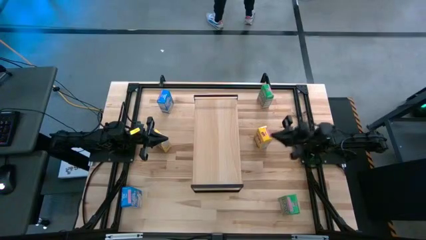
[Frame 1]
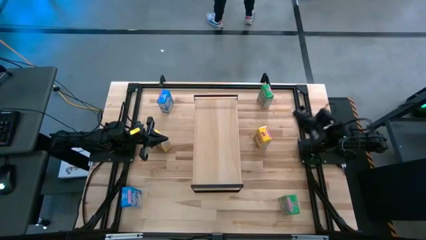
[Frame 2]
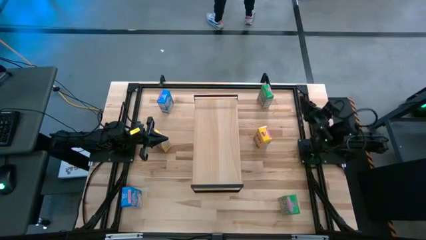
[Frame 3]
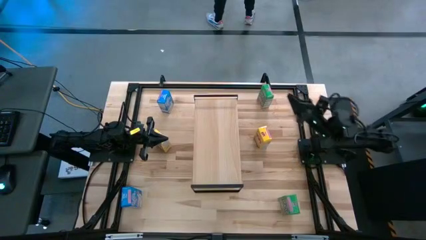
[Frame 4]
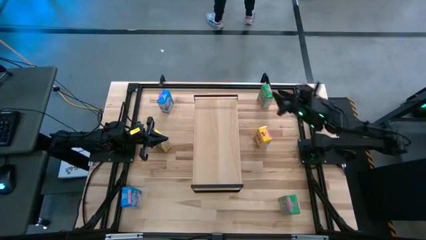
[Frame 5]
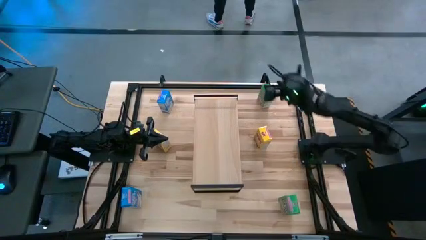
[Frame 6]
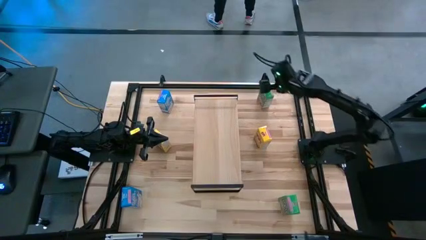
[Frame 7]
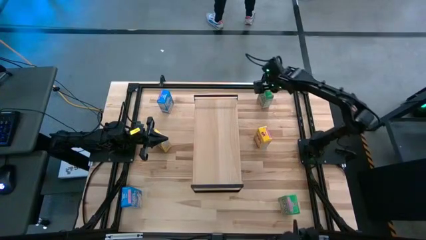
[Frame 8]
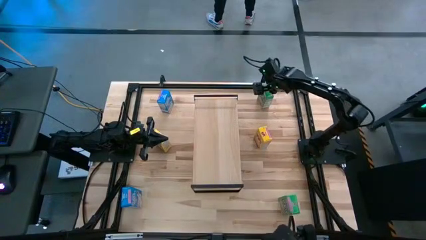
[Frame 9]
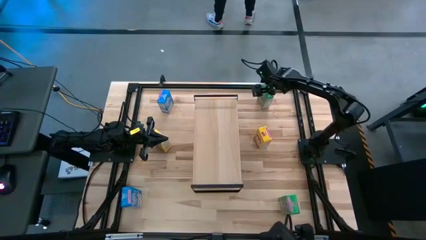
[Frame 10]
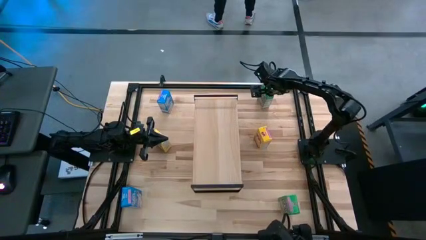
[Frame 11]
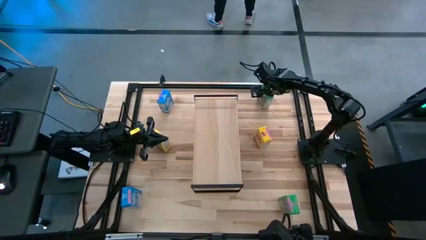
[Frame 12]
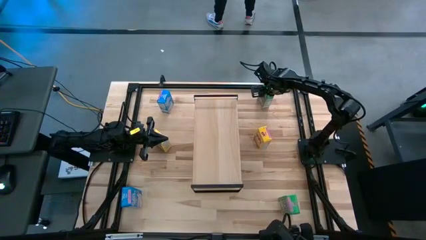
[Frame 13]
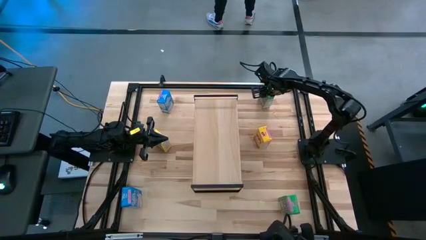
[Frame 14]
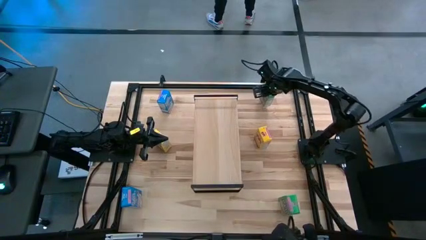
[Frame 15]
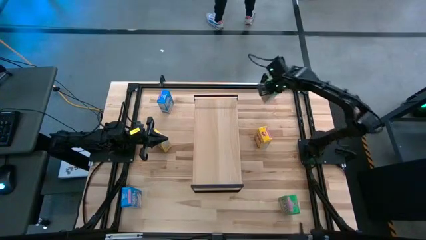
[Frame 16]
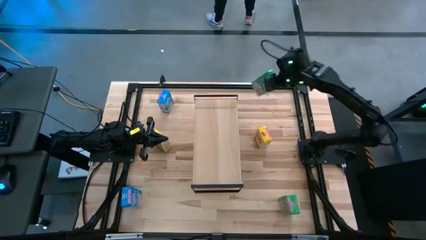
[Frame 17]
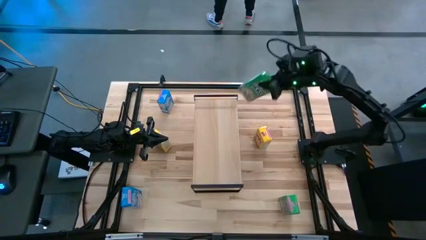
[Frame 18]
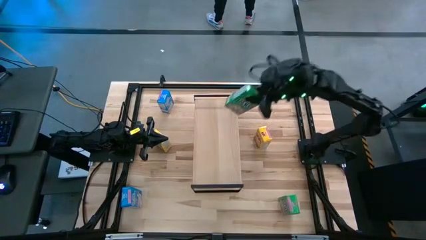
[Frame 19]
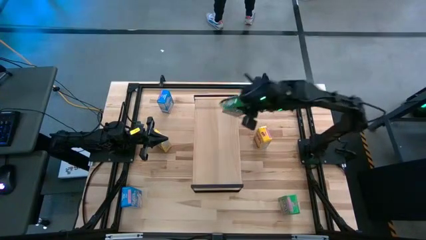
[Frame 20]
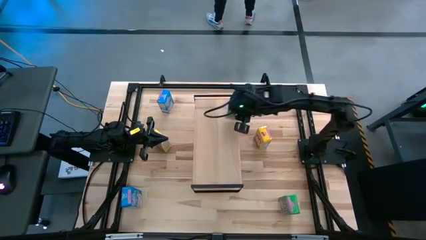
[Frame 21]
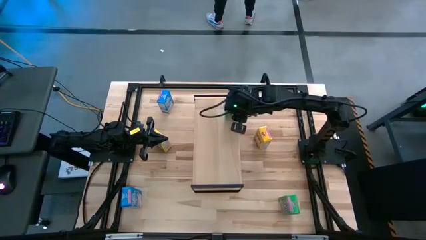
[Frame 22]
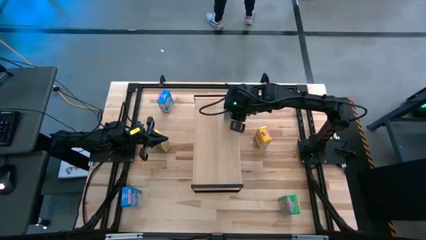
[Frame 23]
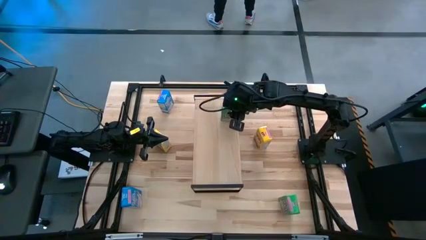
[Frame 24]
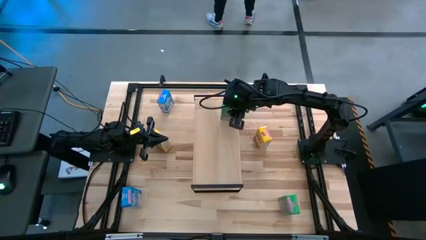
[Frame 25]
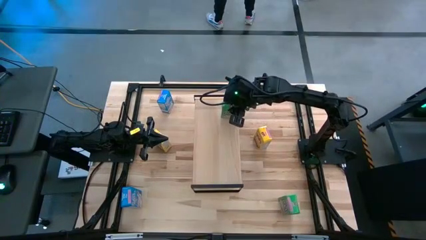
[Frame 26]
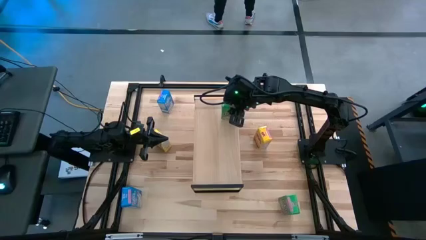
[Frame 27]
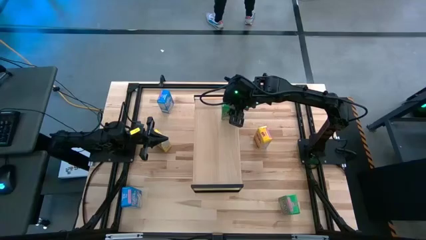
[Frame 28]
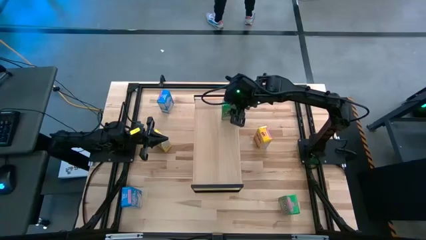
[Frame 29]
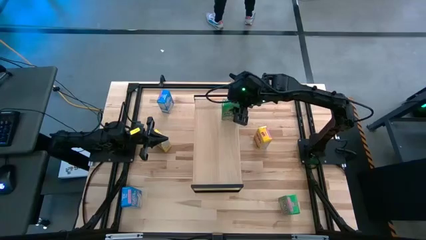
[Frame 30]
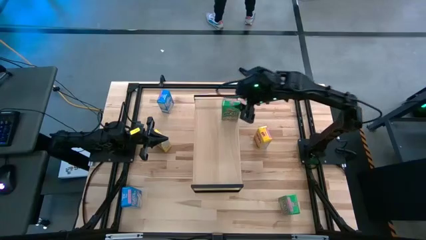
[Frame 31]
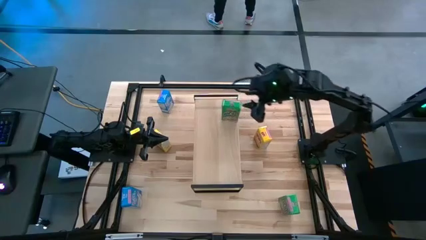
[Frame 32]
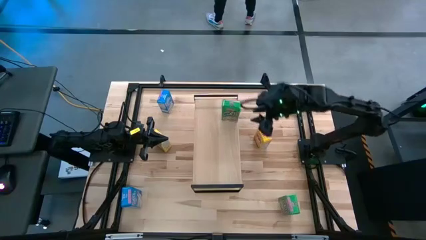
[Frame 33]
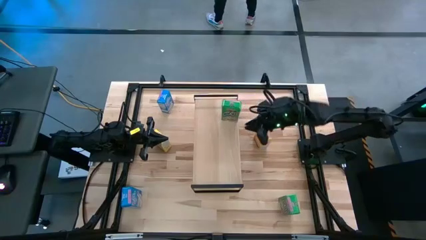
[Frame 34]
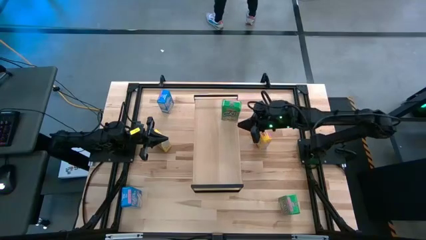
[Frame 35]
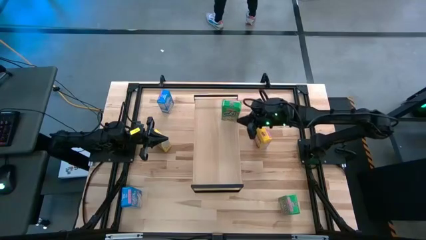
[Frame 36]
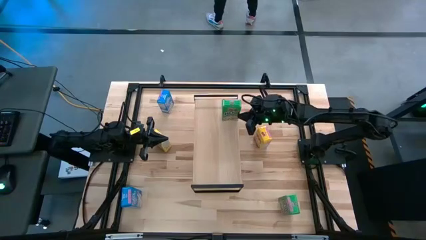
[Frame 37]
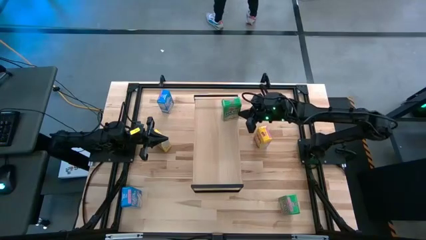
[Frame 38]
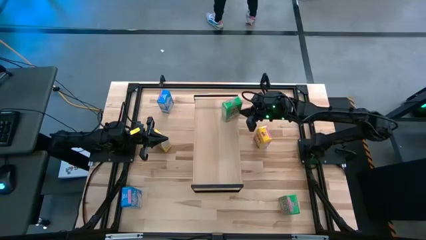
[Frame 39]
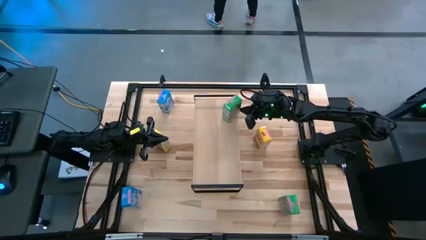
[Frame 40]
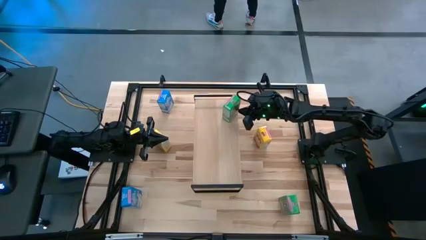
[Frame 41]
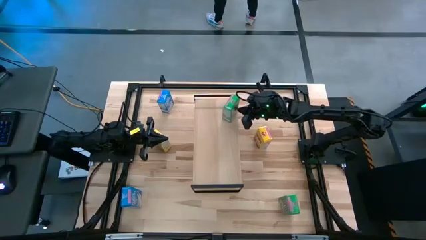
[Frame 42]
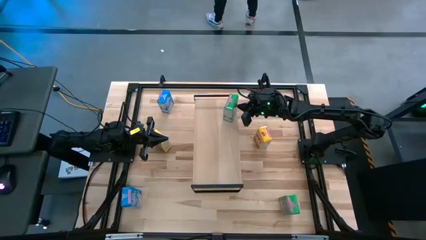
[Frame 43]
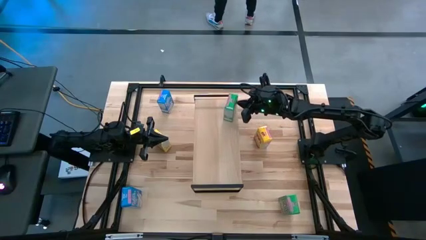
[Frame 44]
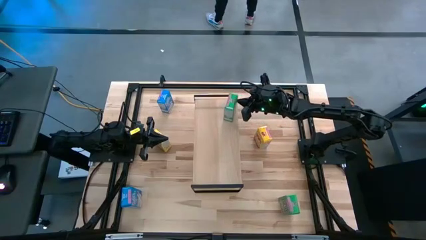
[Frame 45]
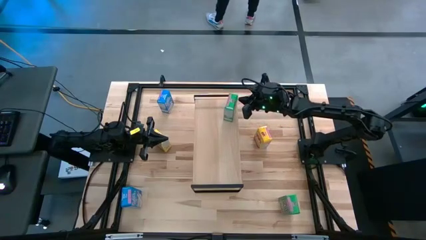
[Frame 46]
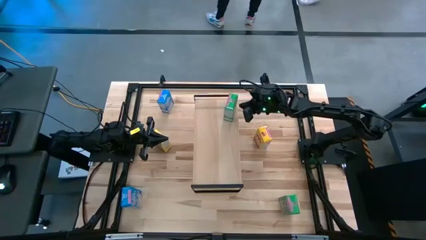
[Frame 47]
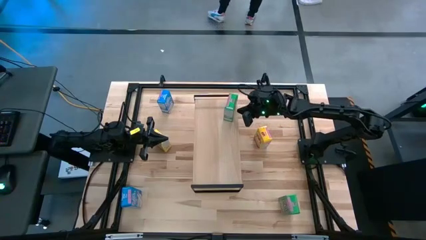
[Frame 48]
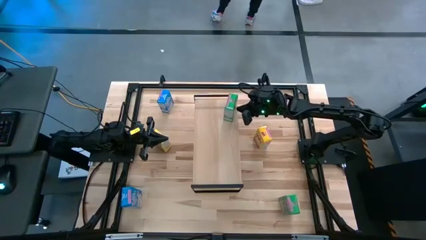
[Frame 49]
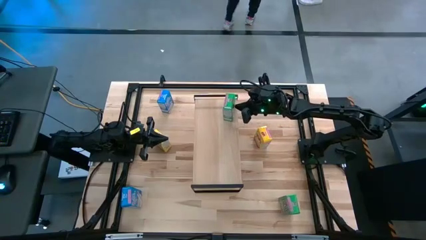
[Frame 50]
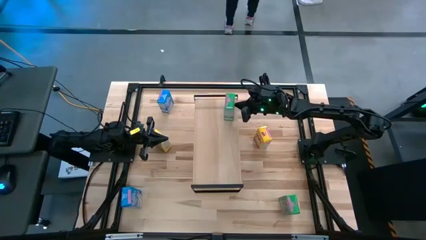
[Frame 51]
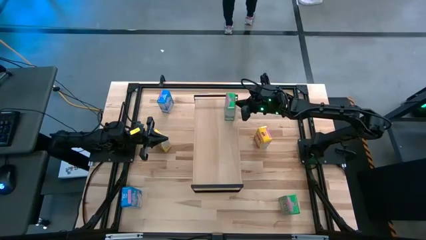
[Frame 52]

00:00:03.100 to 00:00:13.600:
Task: Stack cereal on shelf
Put the top green cereal box on the shelf
